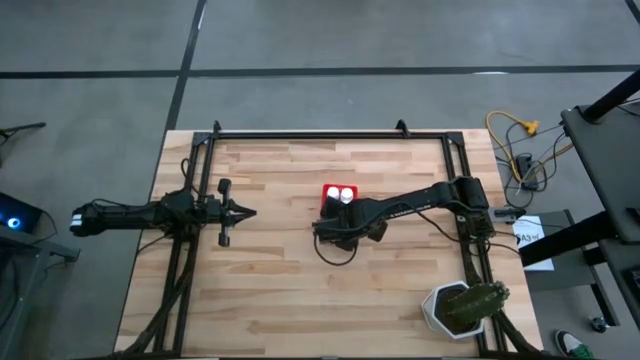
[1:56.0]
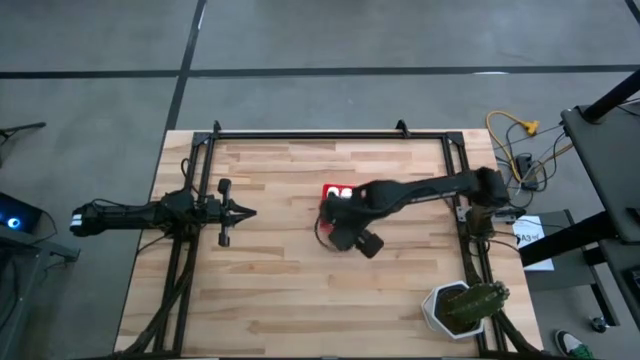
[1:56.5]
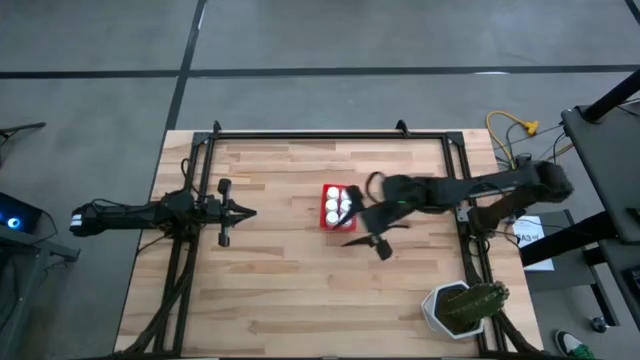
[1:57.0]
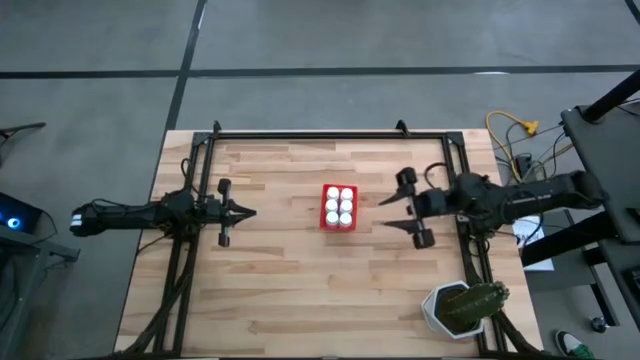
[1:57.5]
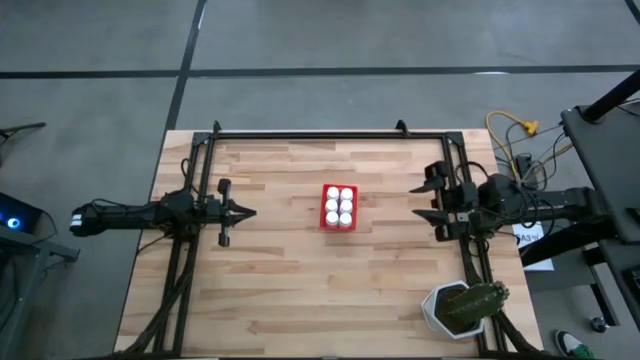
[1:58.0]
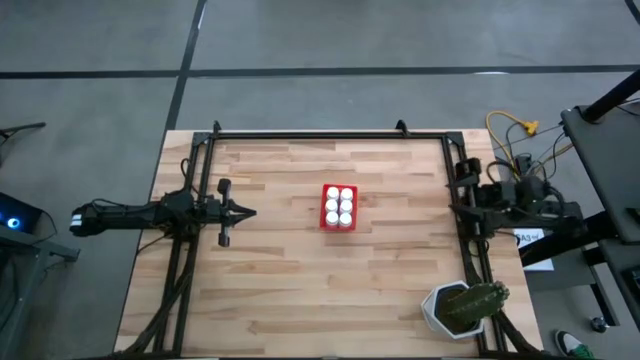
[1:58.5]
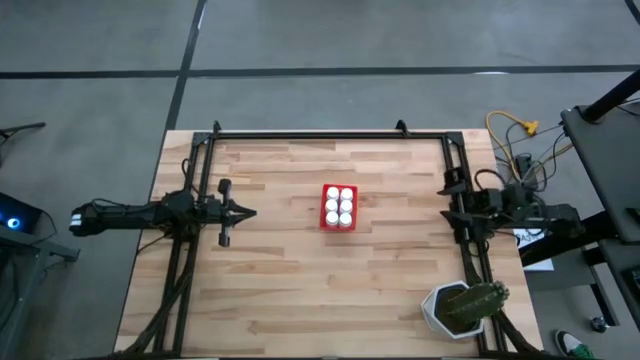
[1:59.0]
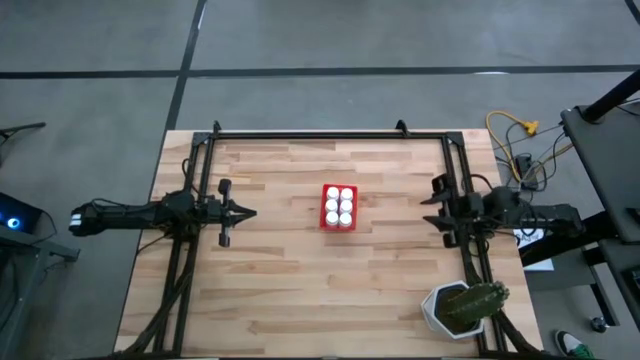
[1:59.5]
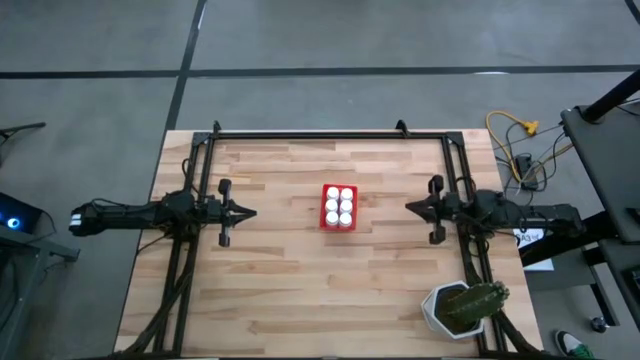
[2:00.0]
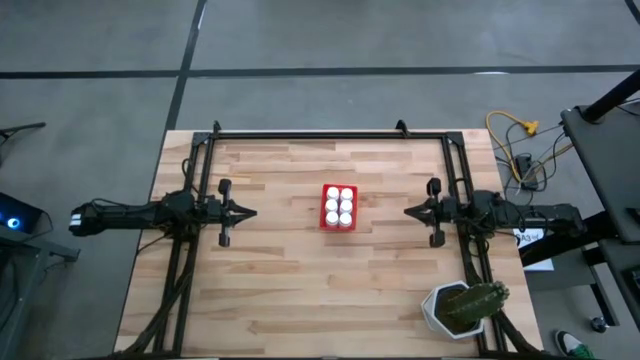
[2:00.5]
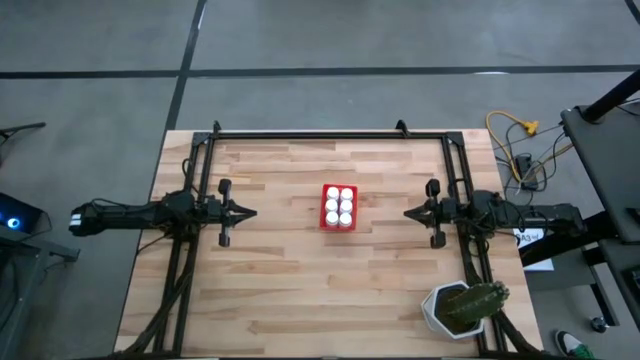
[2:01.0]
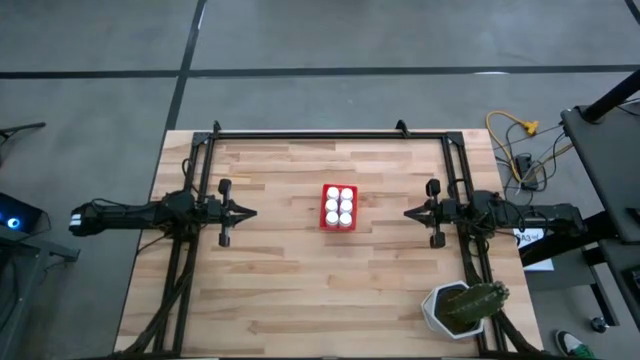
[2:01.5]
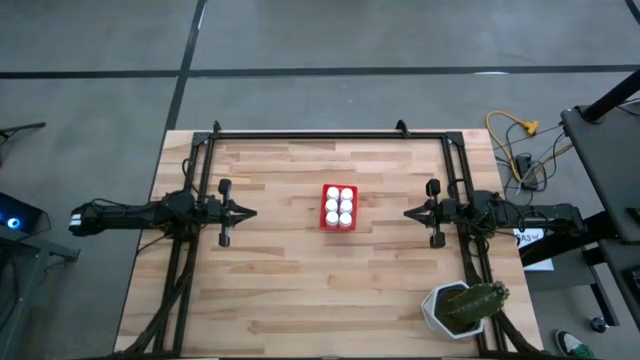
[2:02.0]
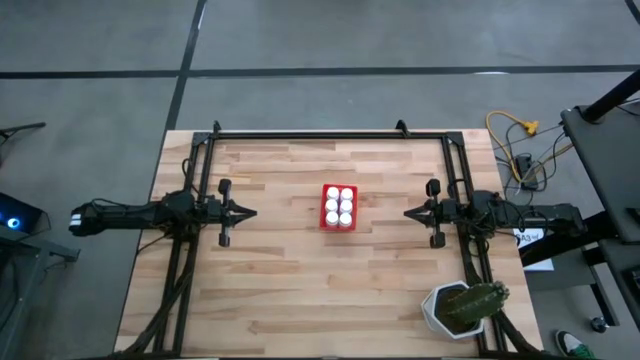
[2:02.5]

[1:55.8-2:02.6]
Task: Pick and place pill bottles into a basket
Return to Home Position

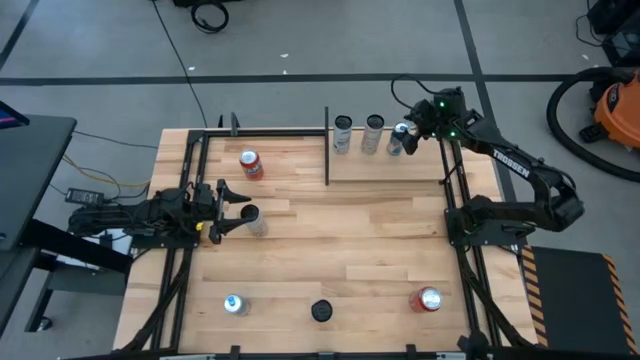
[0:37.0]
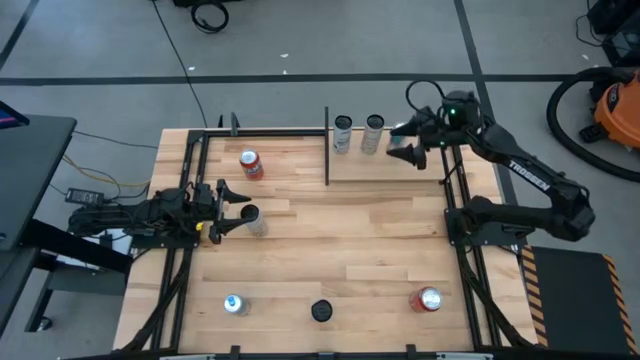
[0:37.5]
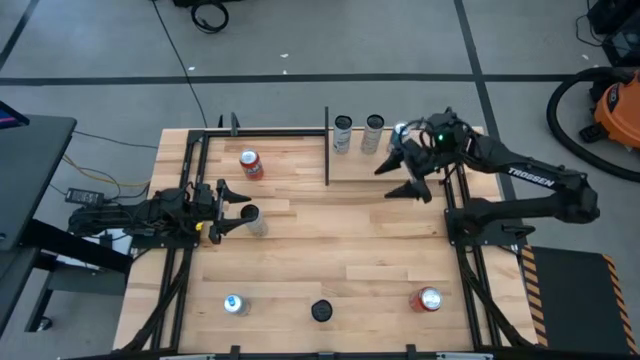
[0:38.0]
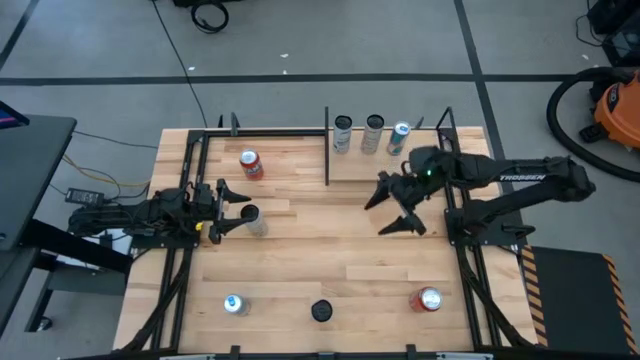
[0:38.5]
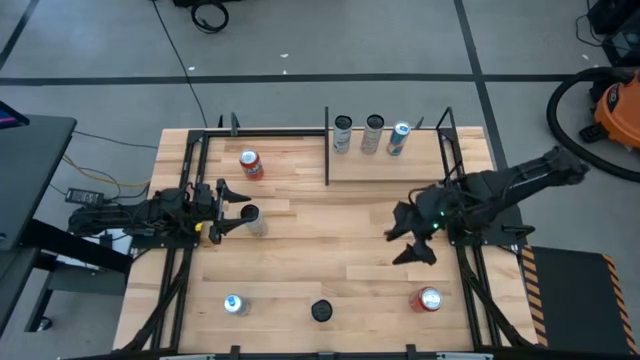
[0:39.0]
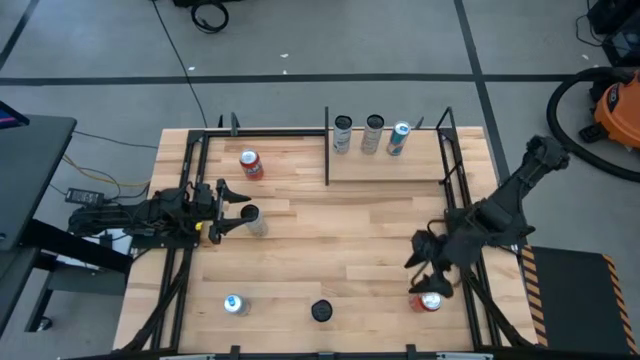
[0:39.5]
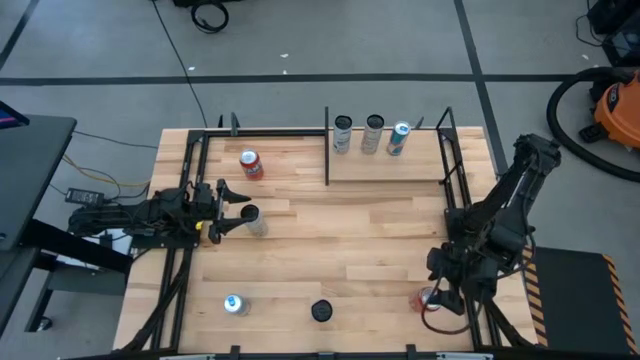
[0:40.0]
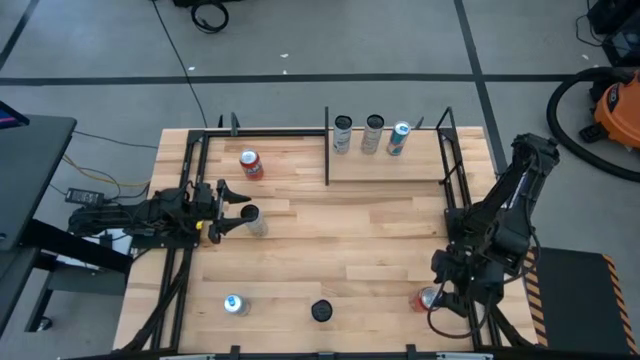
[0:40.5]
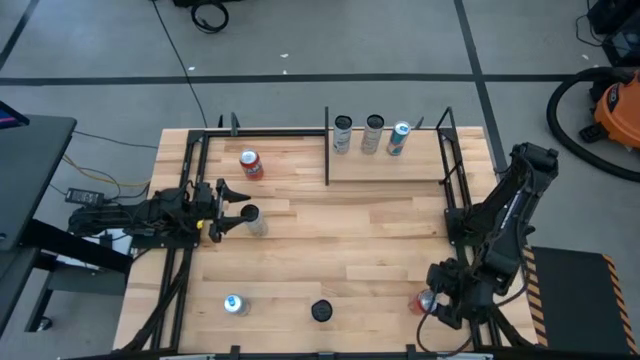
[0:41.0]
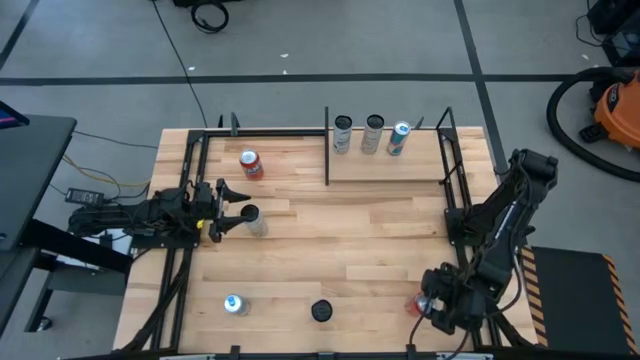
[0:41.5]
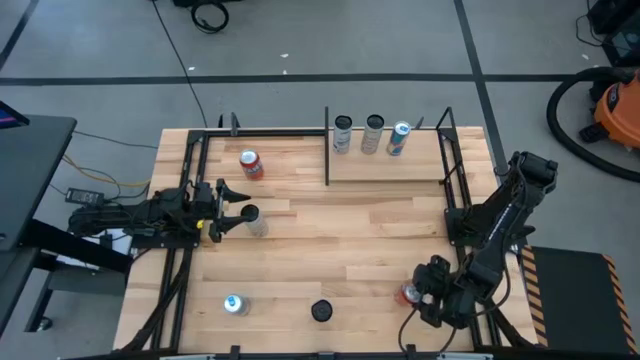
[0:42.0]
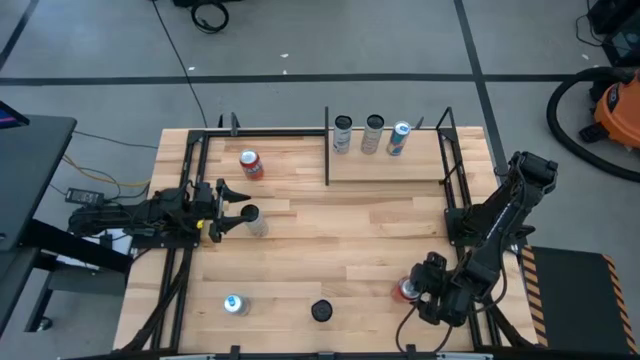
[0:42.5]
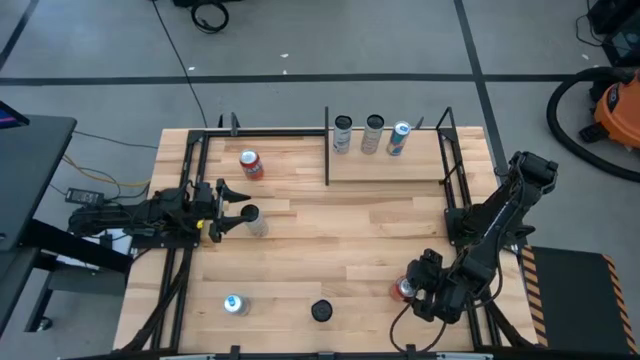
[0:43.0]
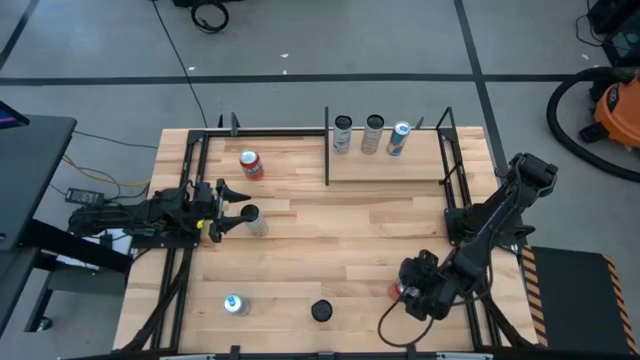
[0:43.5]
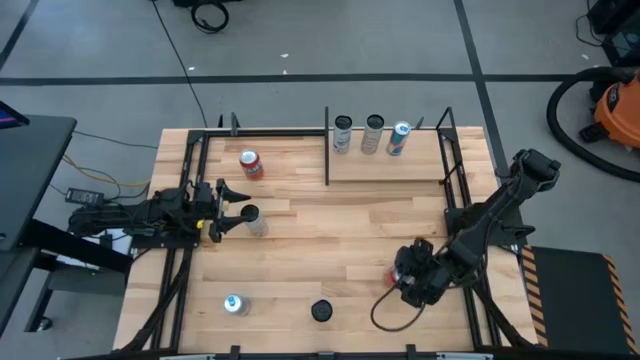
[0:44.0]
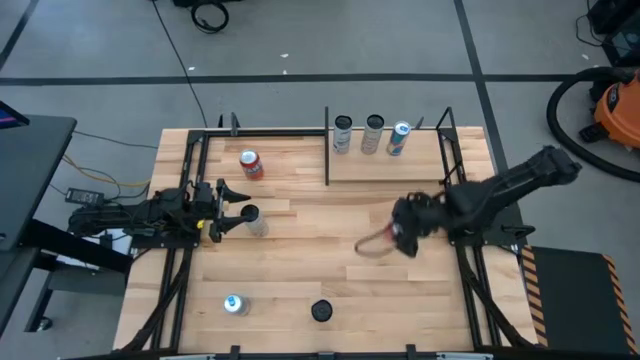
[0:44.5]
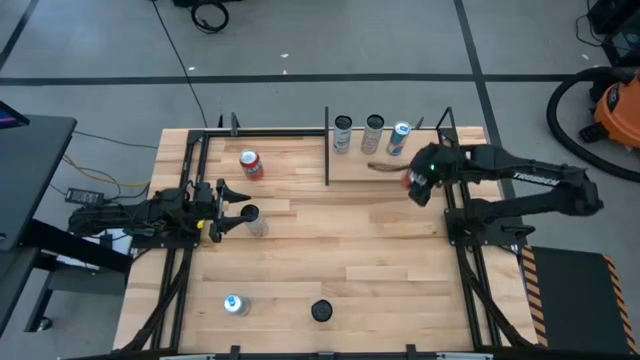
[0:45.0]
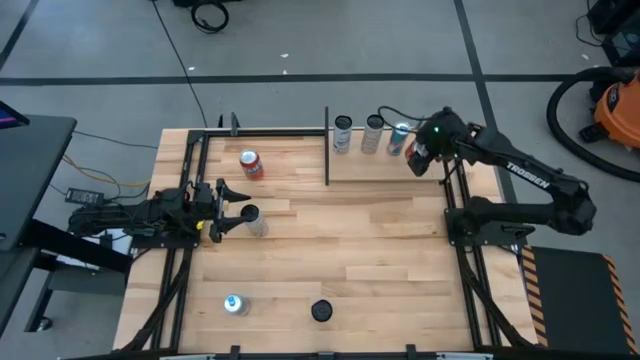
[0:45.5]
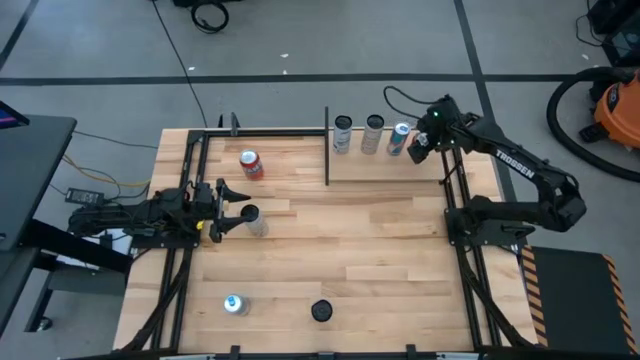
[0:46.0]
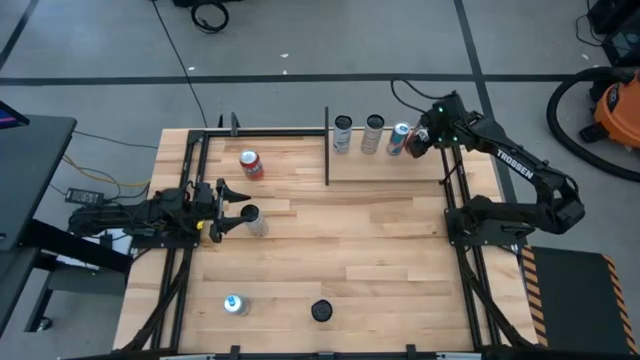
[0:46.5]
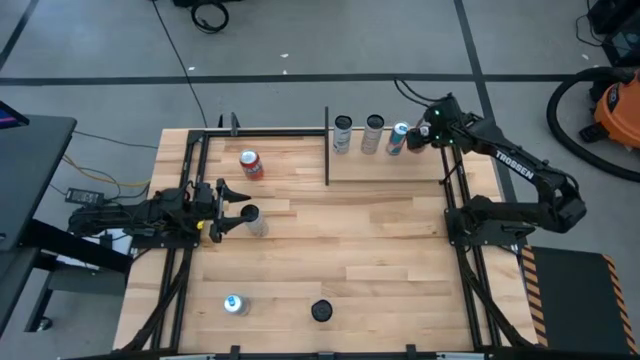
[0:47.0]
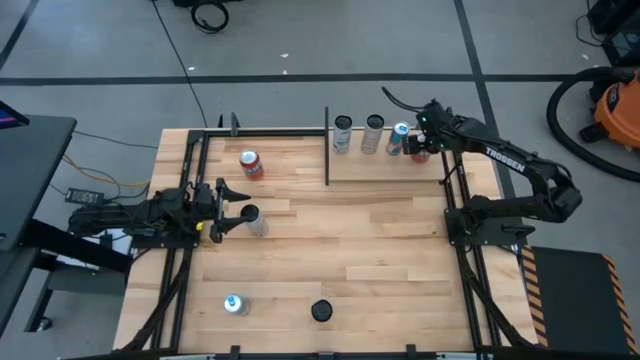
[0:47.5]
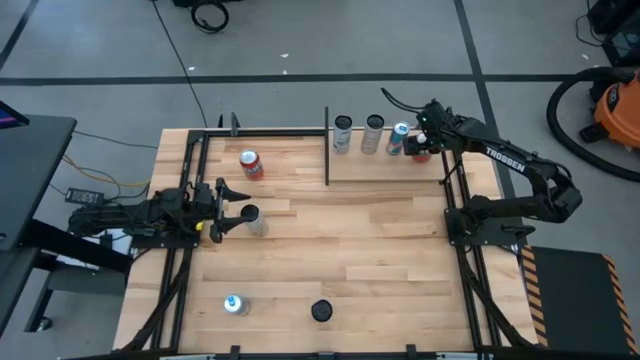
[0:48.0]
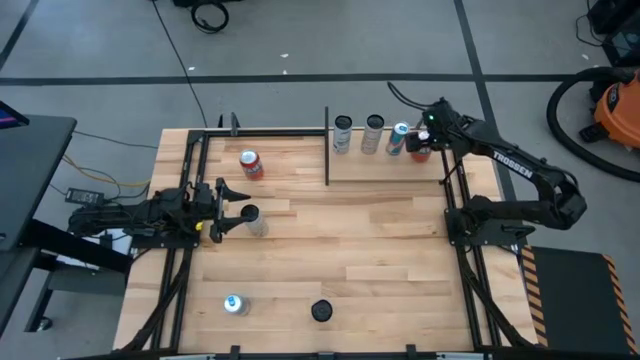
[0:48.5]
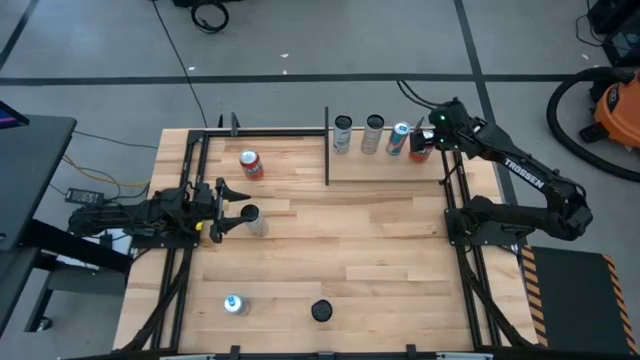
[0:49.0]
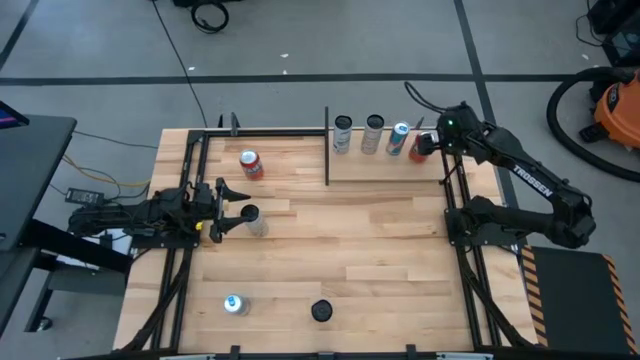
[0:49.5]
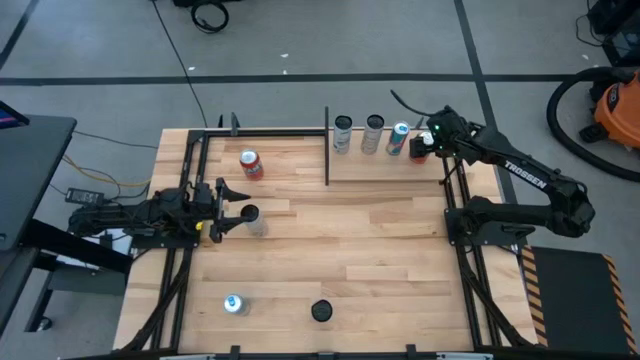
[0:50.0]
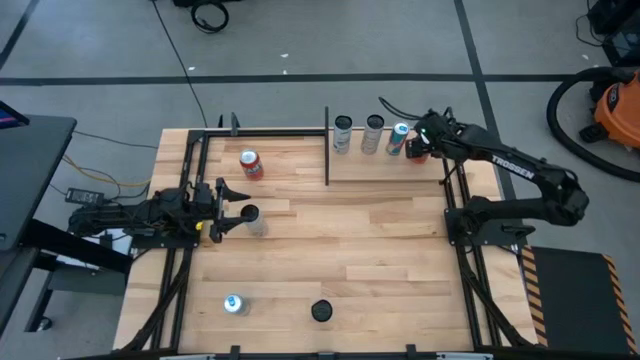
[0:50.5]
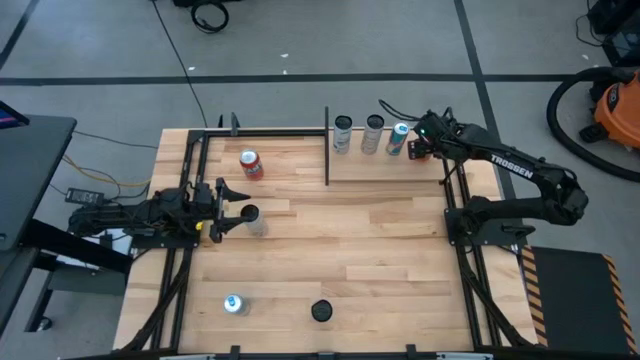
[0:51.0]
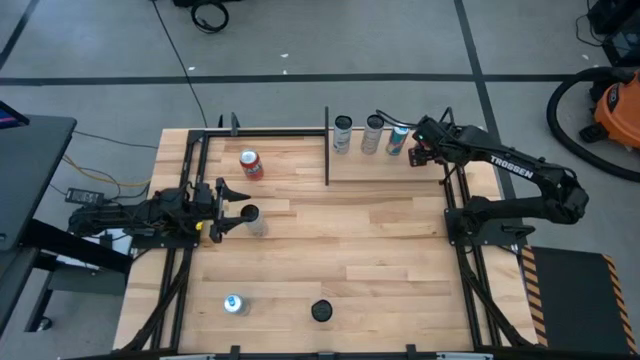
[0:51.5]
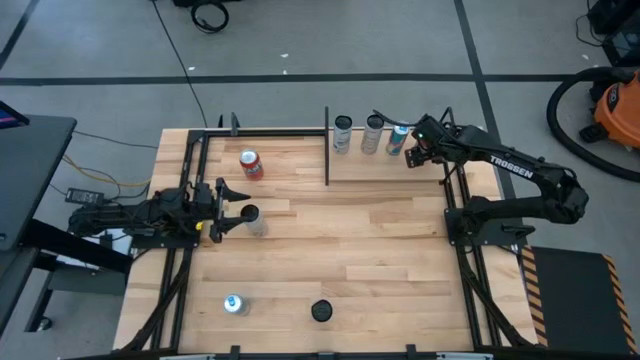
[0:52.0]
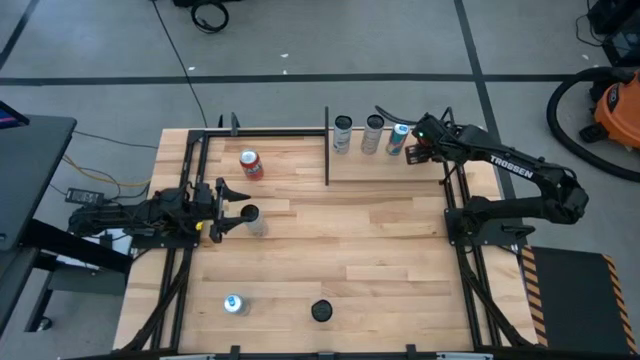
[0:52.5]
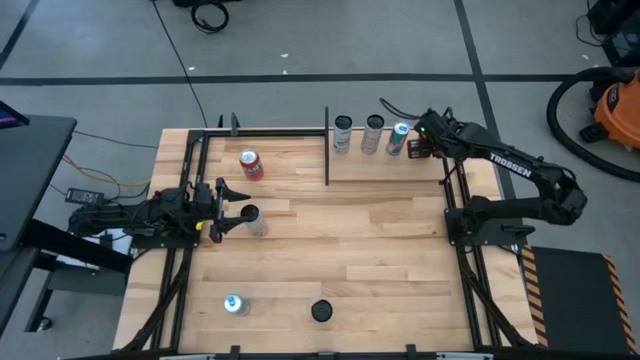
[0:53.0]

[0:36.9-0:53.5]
Task: Place canned beverage on shelf
Put the bottom red soda can on the shelf
